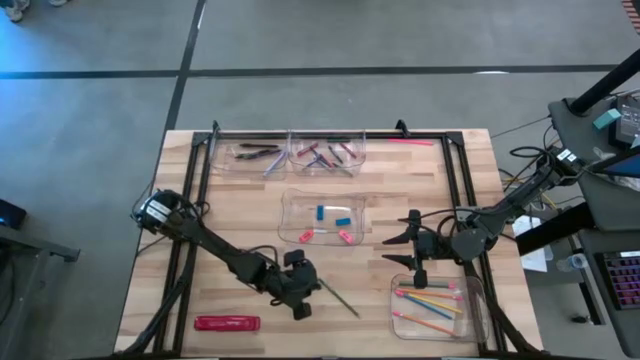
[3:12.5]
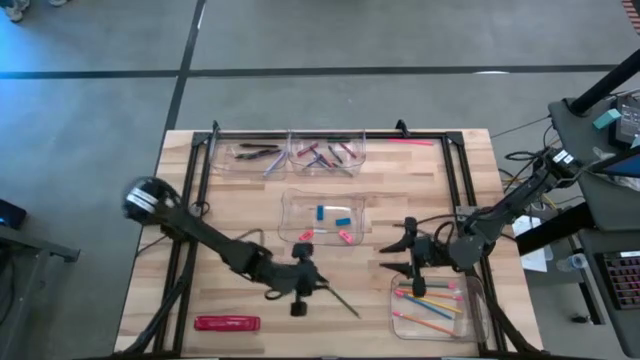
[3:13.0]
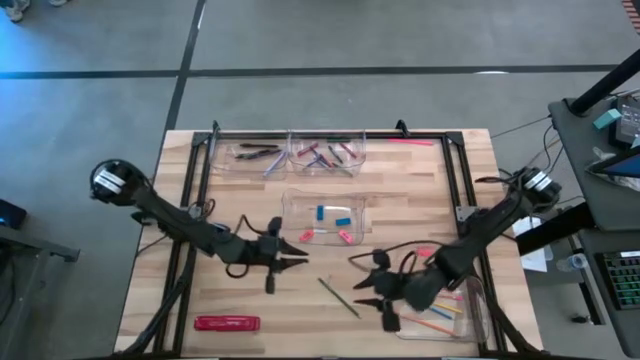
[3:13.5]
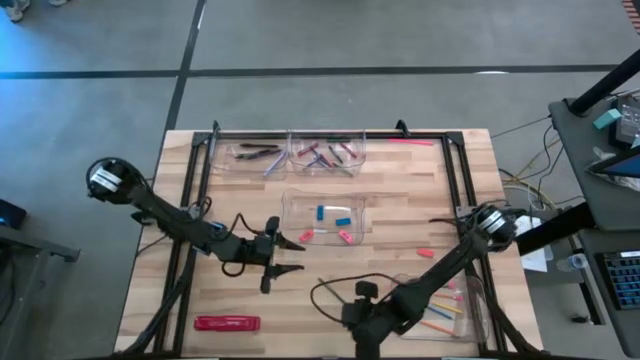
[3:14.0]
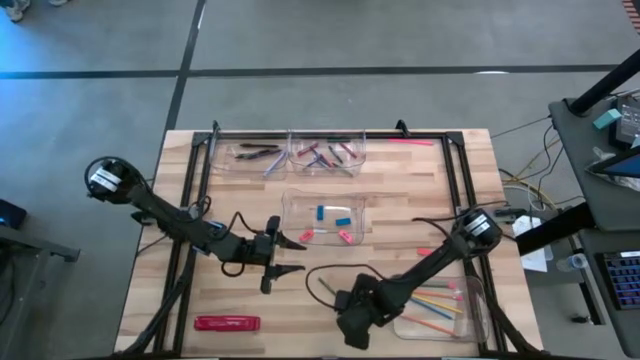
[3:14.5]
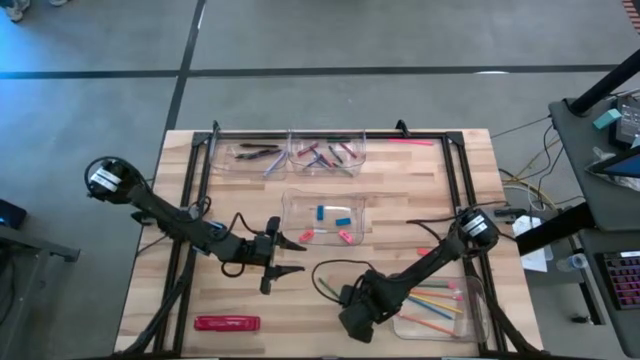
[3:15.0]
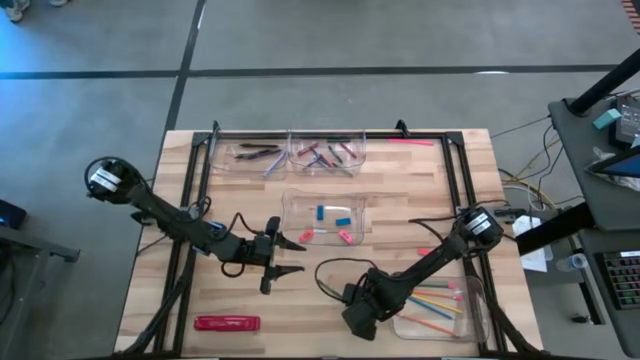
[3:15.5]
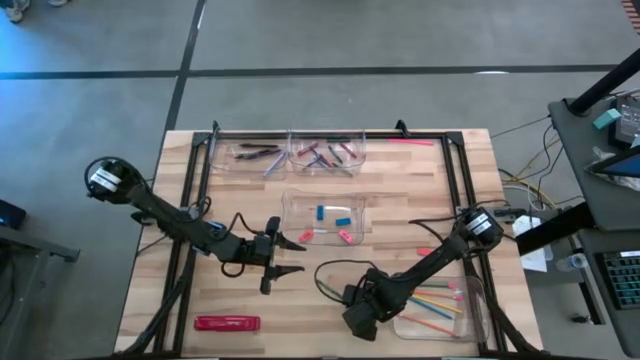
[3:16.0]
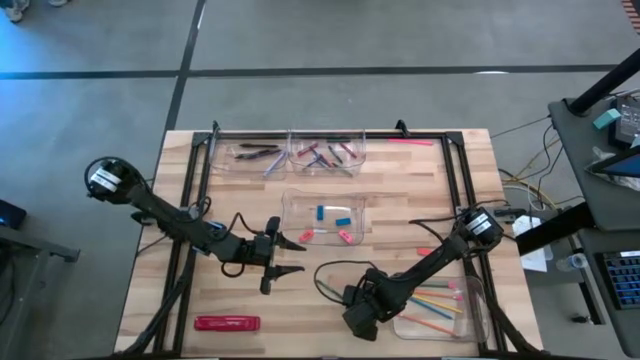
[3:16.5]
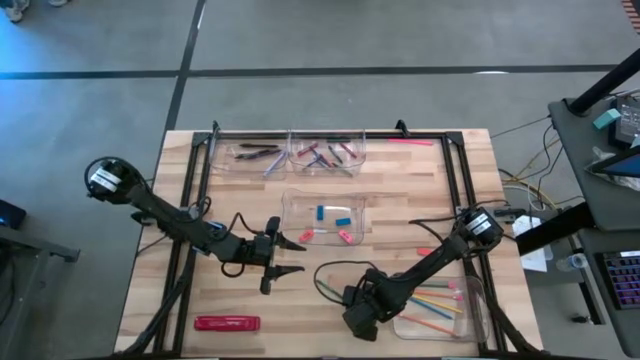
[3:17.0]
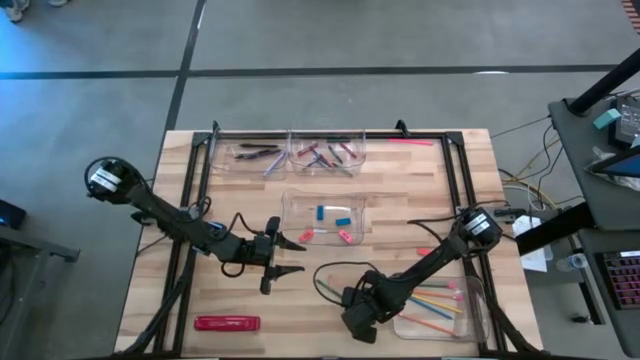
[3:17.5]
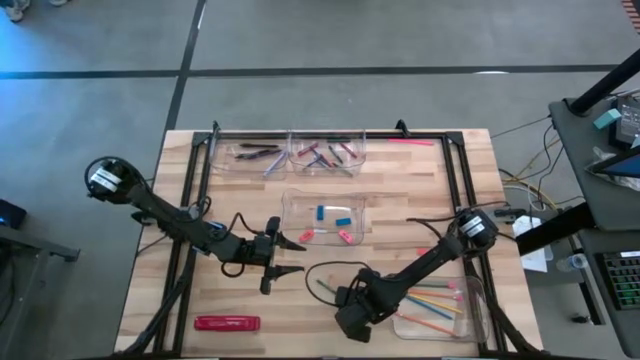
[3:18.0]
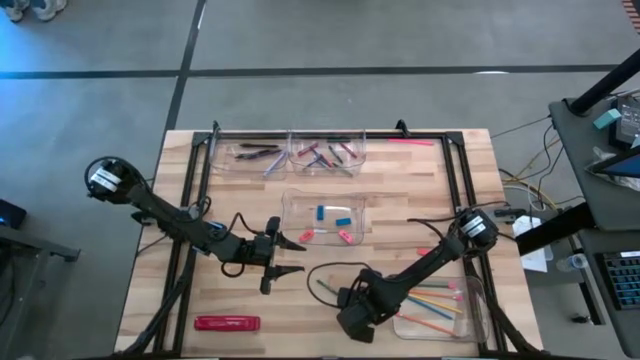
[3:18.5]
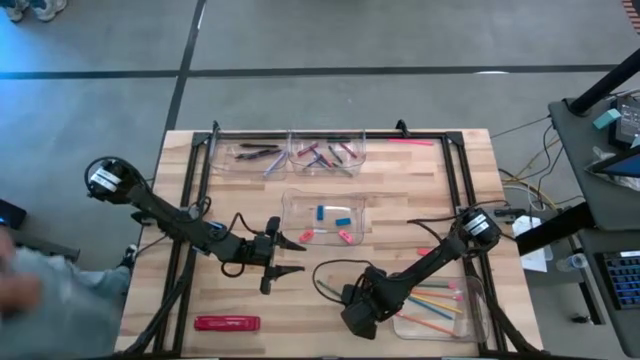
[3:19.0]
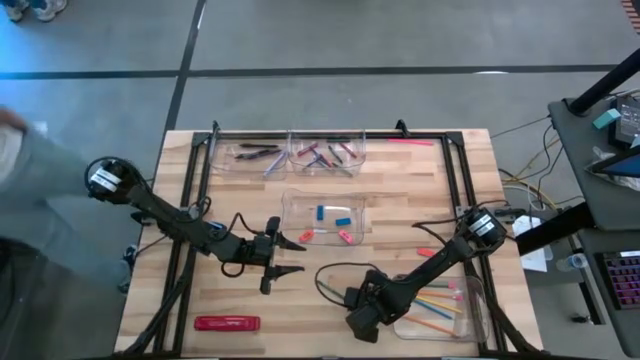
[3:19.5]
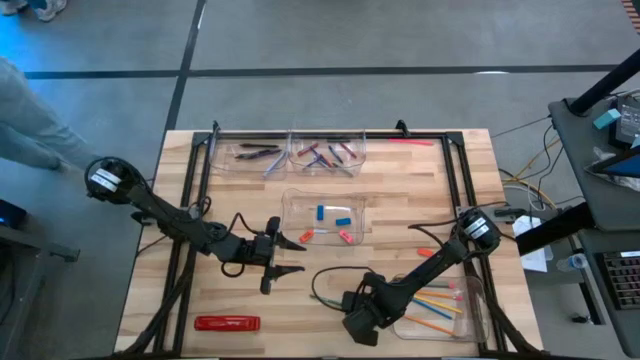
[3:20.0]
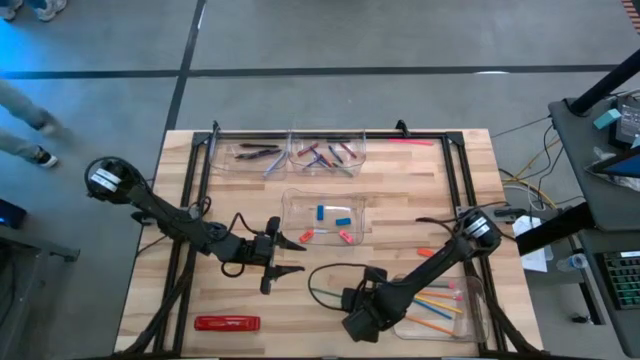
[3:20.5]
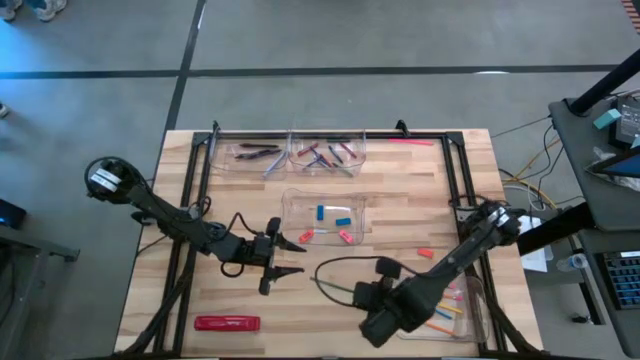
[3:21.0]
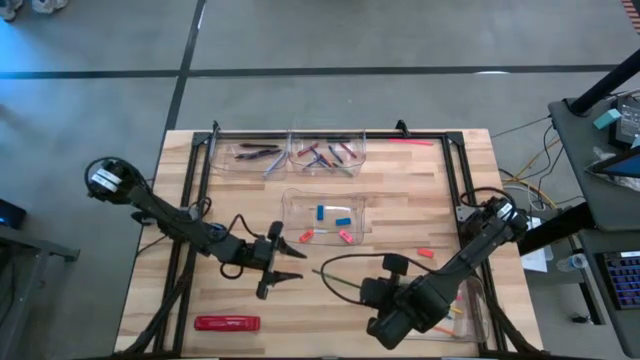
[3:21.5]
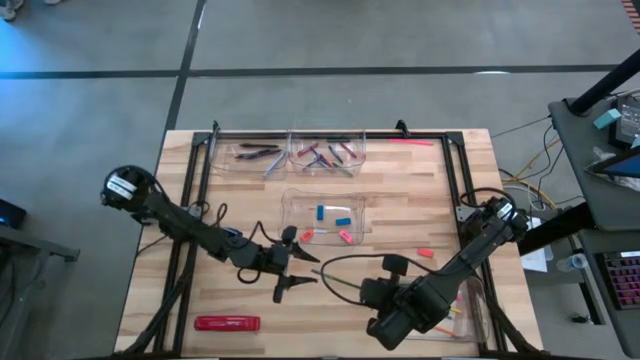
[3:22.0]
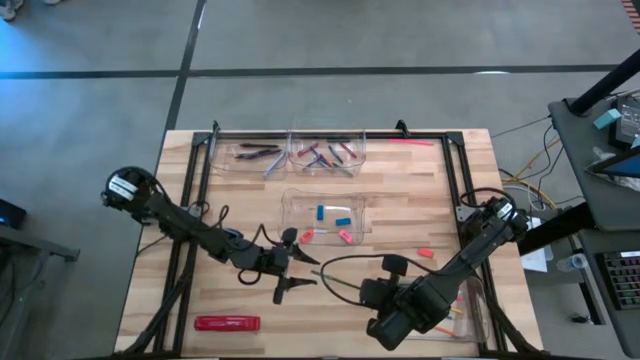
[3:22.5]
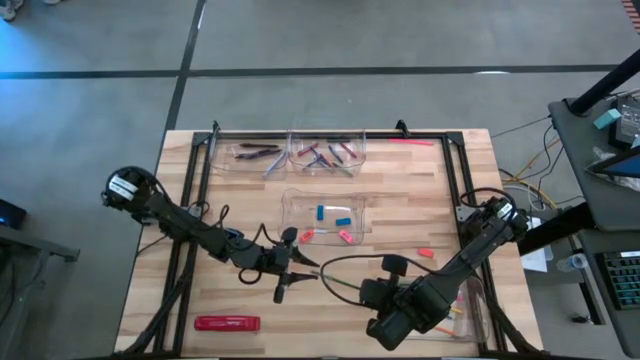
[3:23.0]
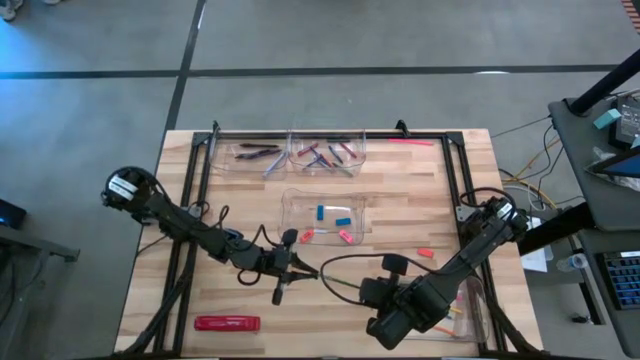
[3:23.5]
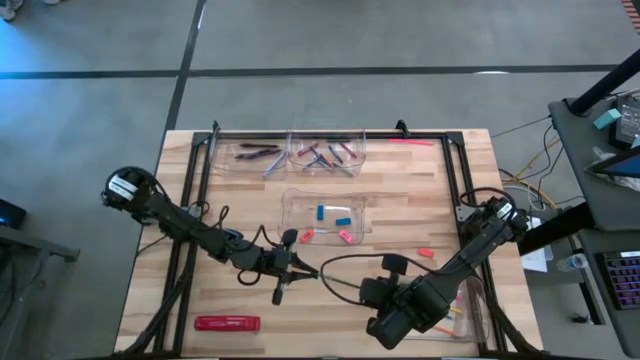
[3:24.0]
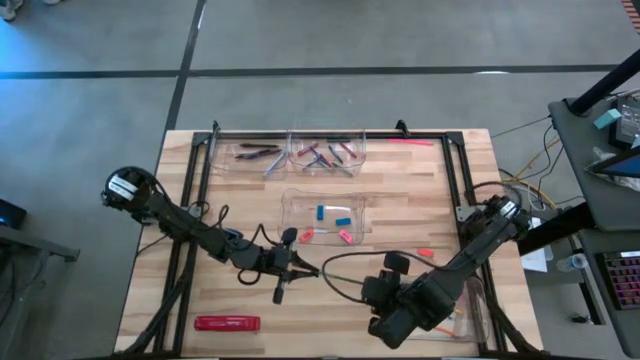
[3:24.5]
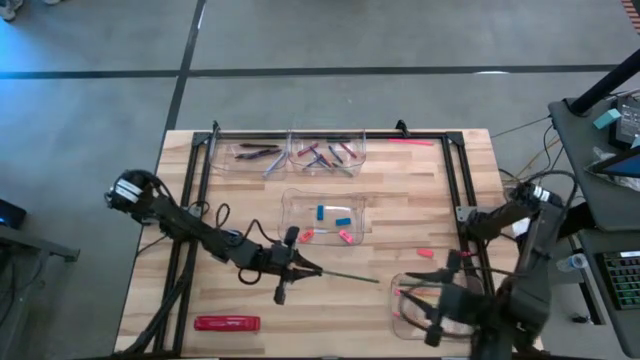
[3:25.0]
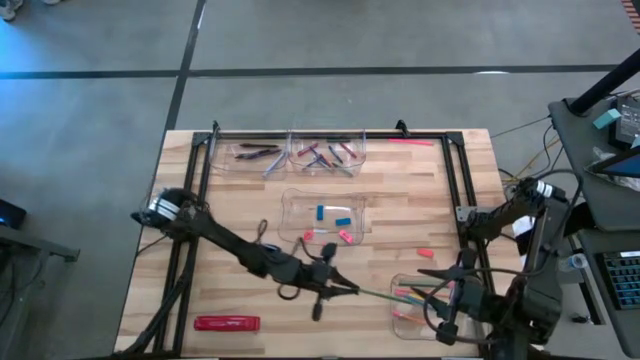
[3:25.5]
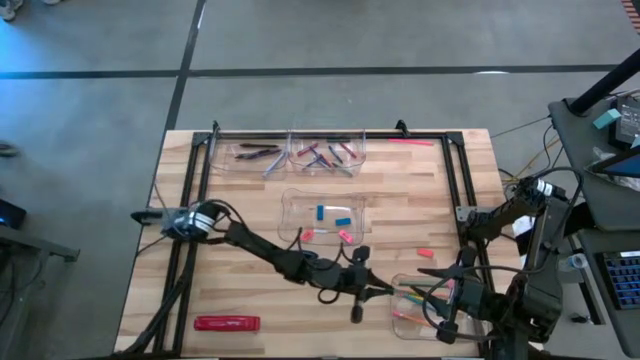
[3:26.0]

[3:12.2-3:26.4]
Task: Sort crayons/erasers/pens/pencils in bins
Put the green pencil into the bottom transparent bin

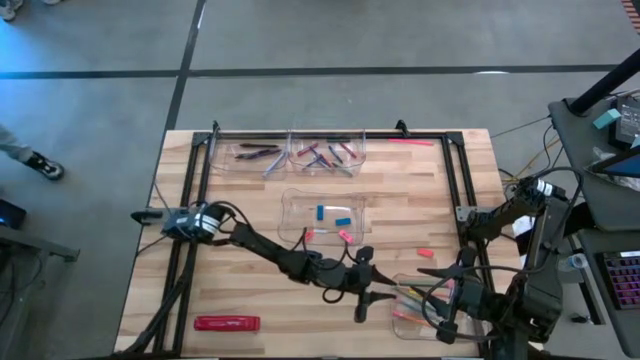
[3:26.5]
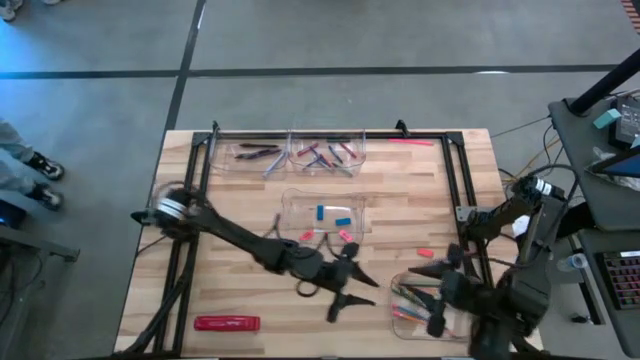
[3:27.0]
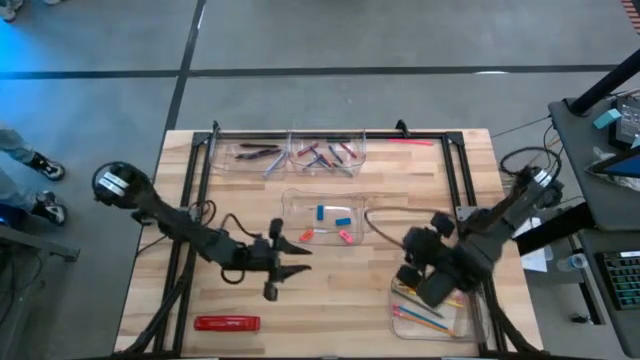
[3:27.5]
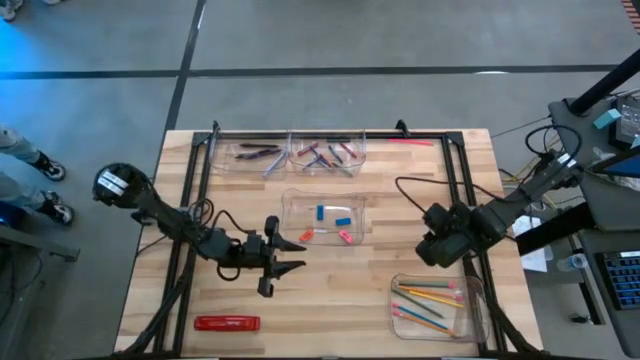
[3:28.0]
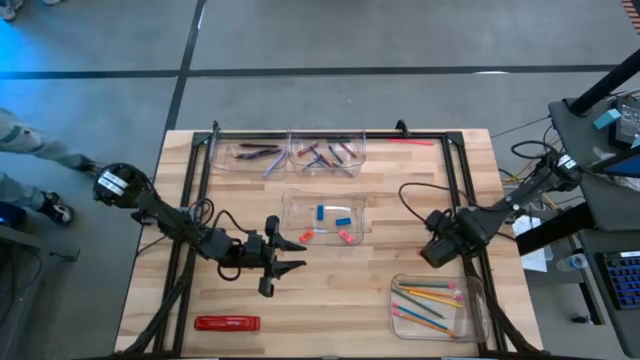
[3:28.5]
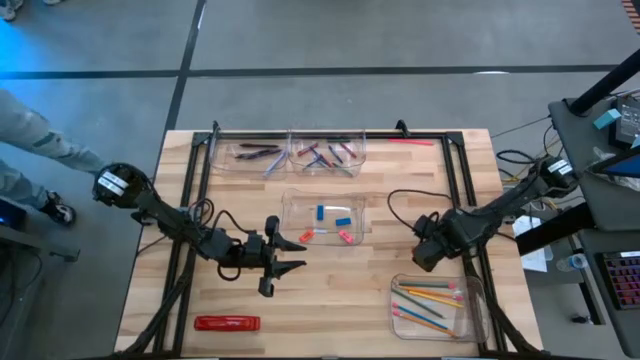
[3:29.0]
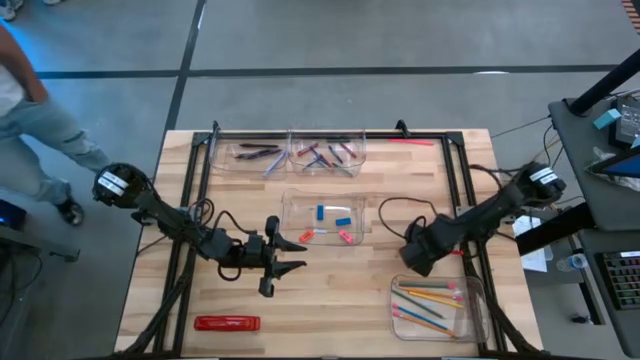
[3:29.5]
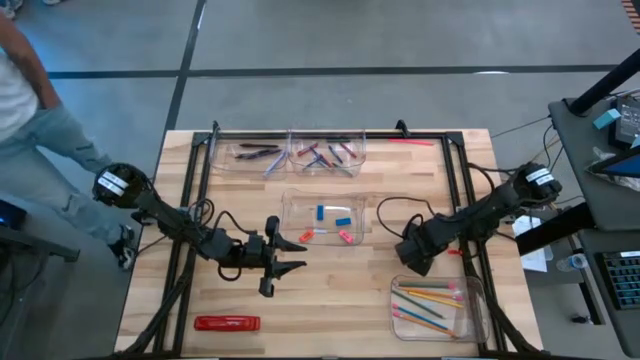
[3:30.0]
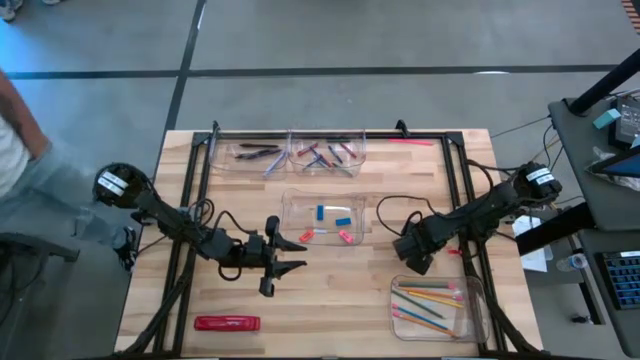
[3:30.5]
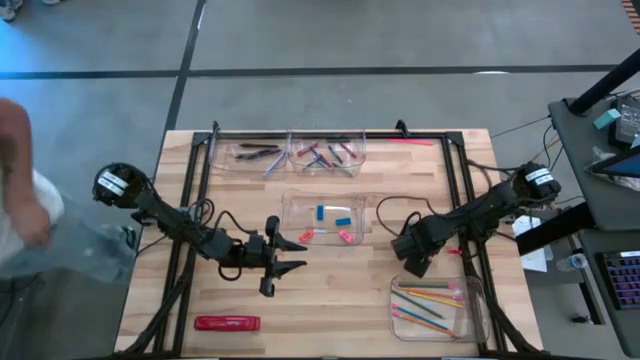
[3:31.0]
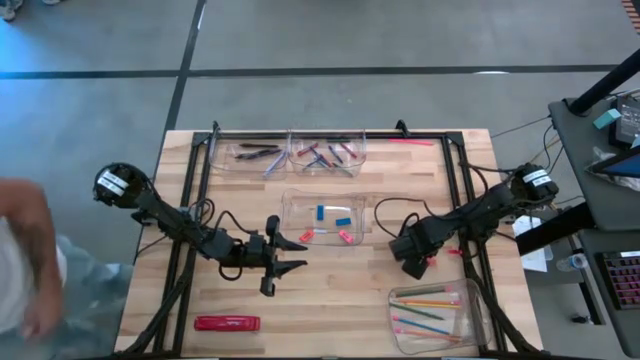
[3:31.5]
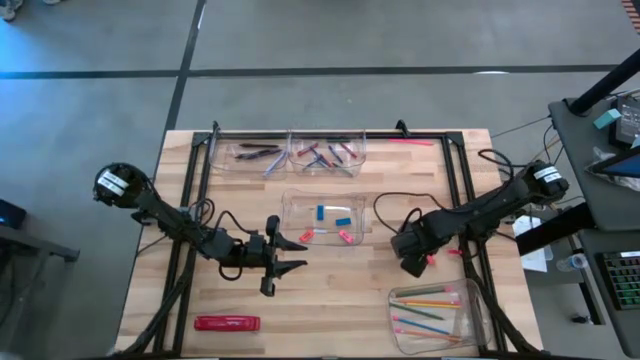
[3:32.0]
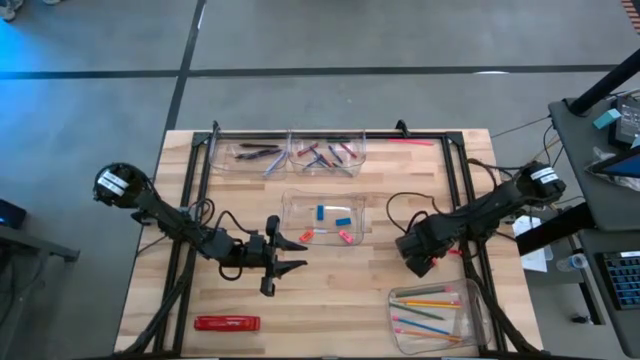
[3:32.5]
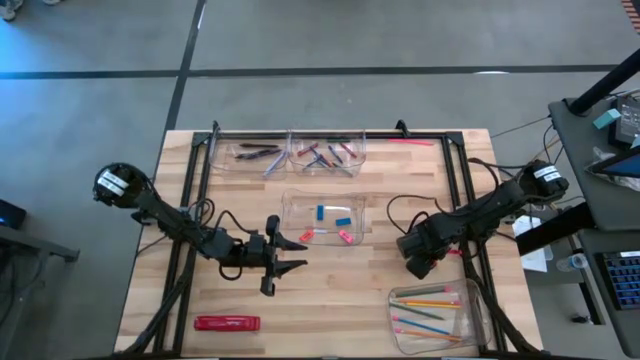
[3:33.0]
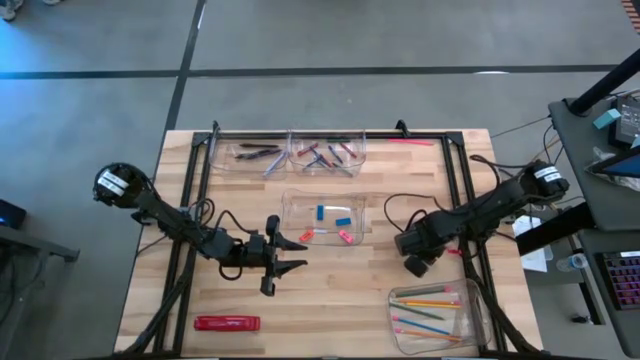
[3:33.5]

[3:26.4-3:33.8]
Put the orange eraser into the middle transparent bin
